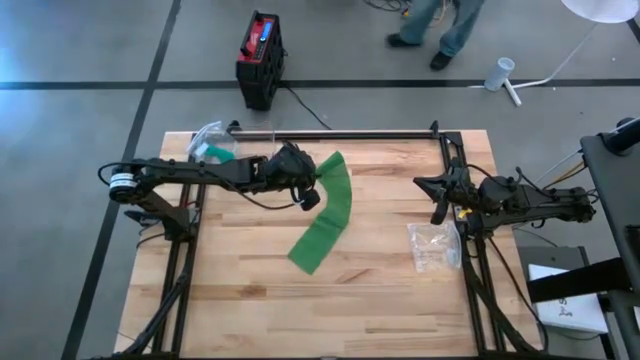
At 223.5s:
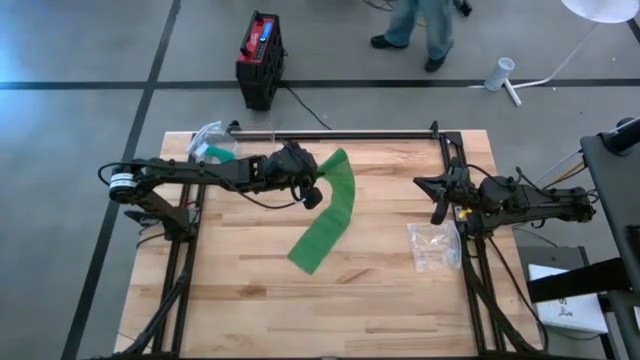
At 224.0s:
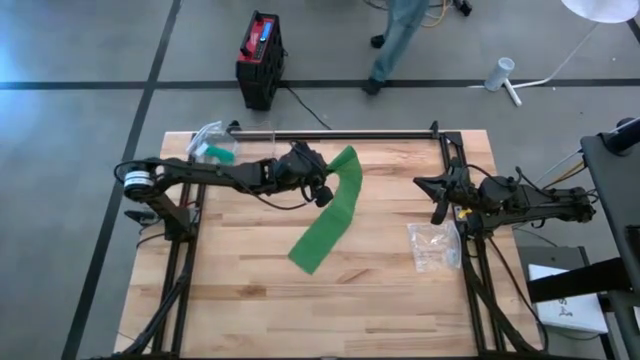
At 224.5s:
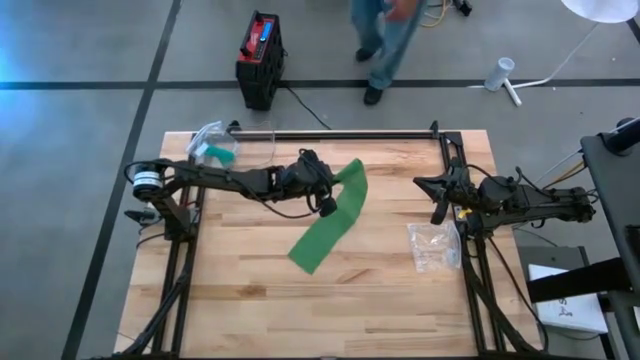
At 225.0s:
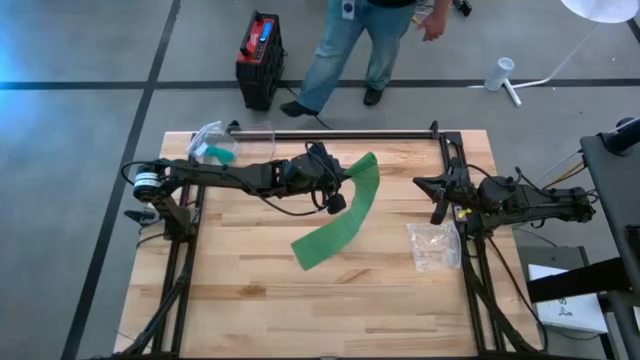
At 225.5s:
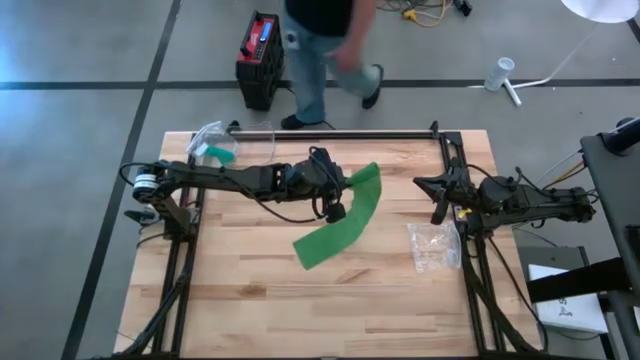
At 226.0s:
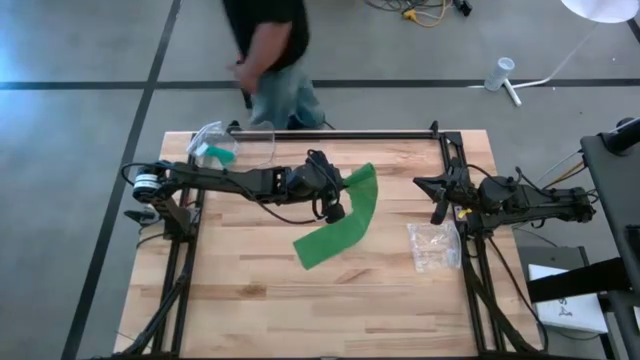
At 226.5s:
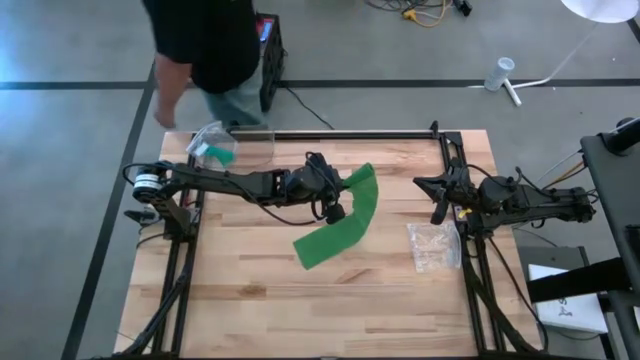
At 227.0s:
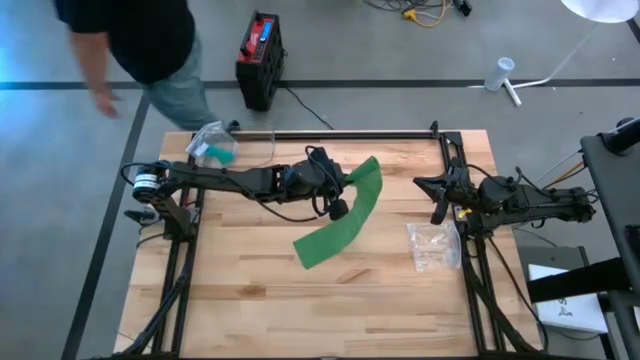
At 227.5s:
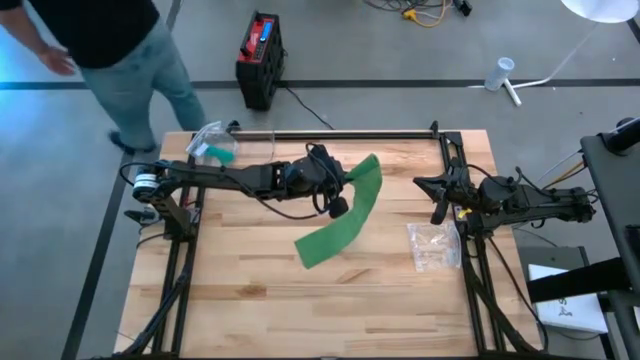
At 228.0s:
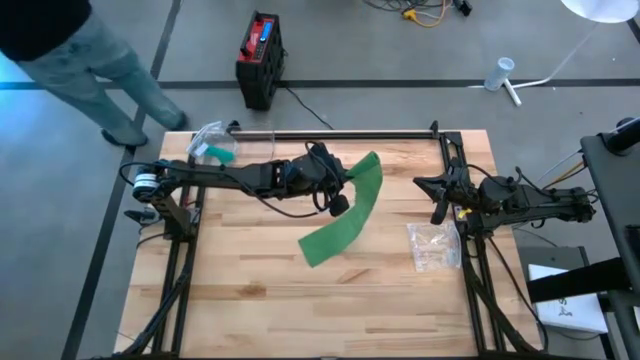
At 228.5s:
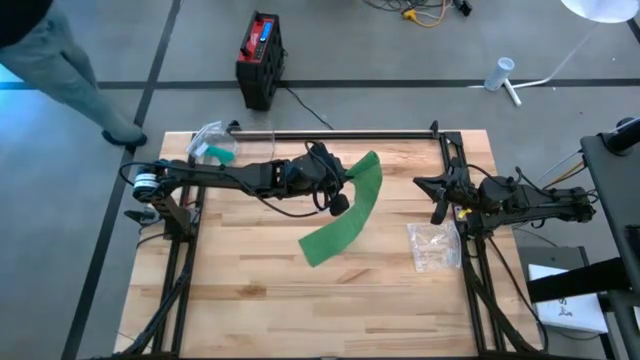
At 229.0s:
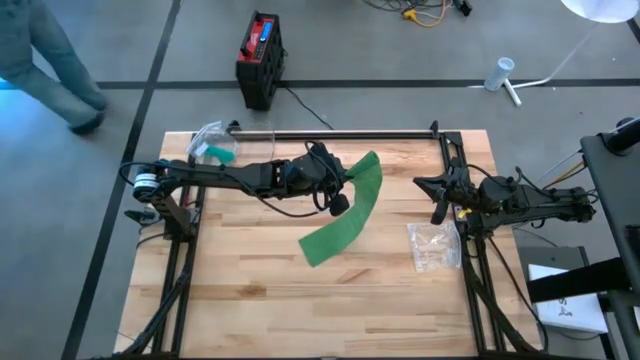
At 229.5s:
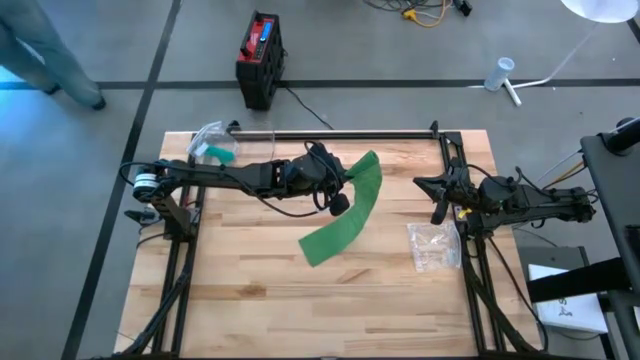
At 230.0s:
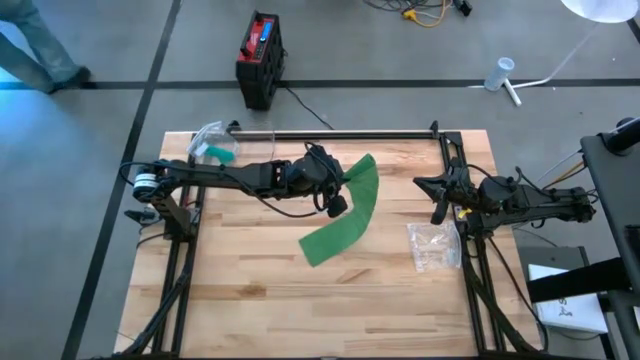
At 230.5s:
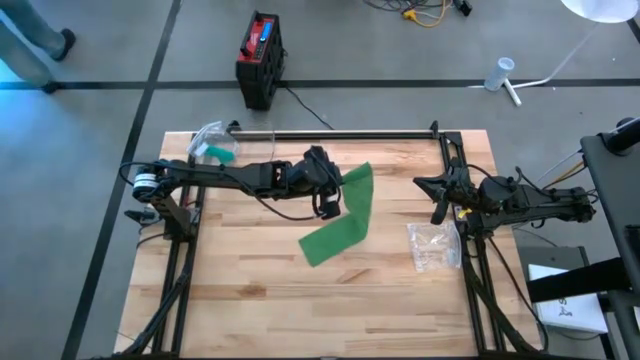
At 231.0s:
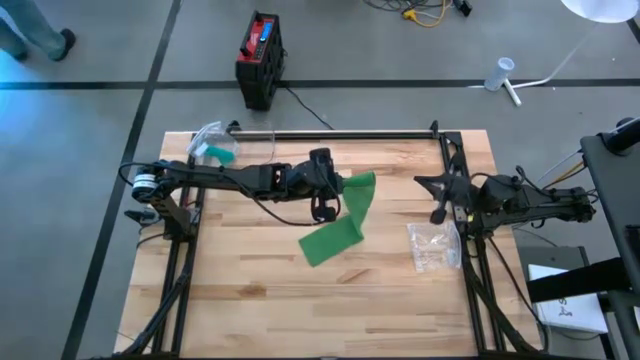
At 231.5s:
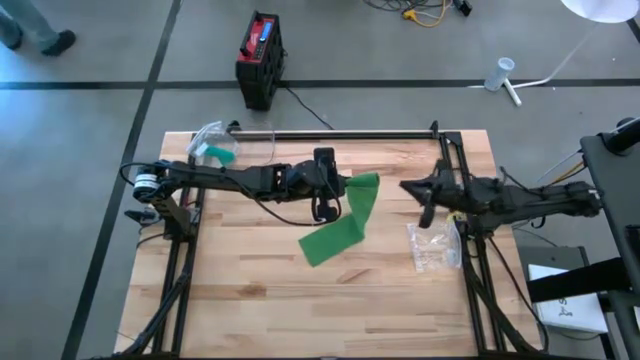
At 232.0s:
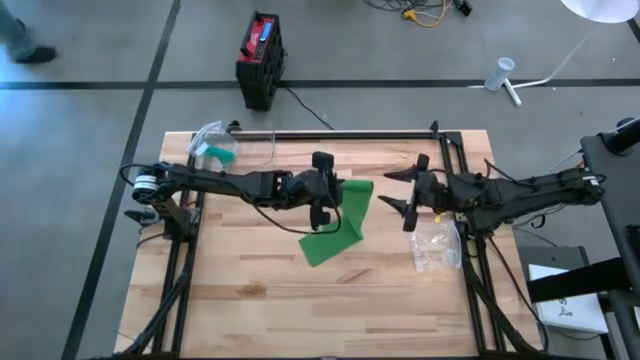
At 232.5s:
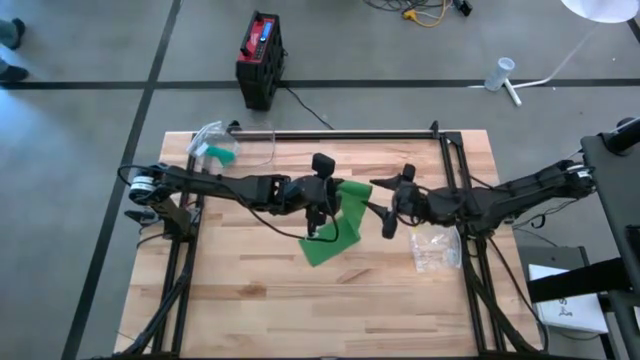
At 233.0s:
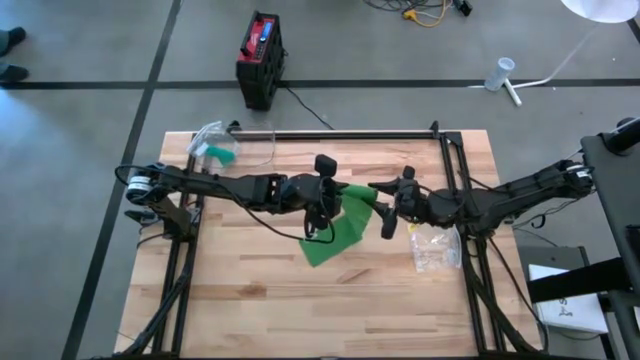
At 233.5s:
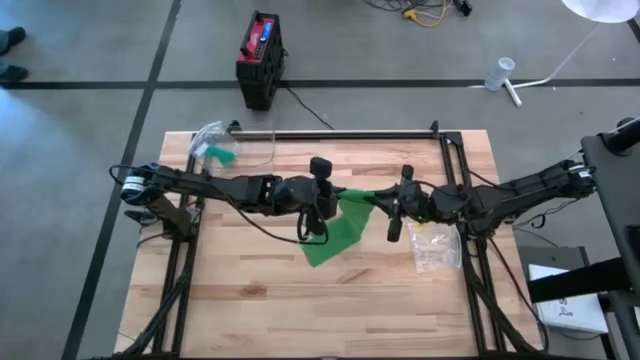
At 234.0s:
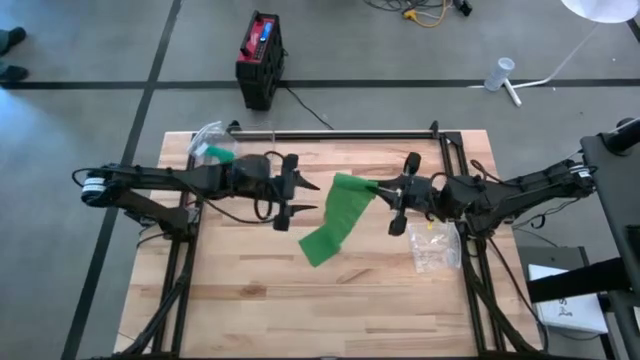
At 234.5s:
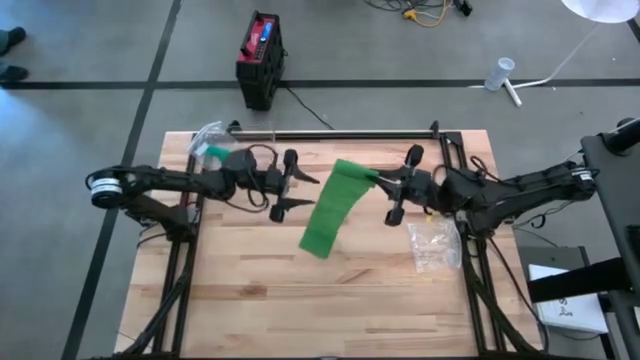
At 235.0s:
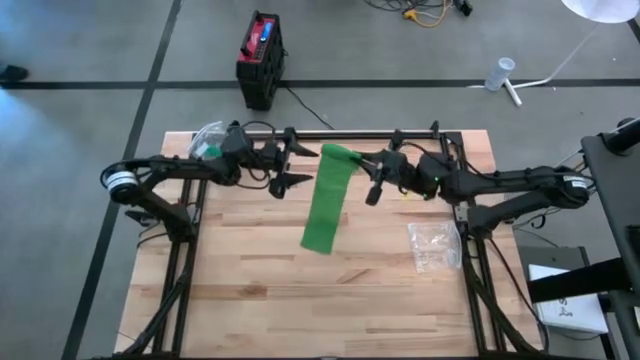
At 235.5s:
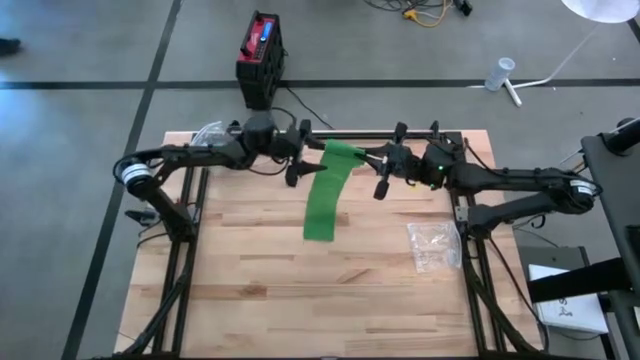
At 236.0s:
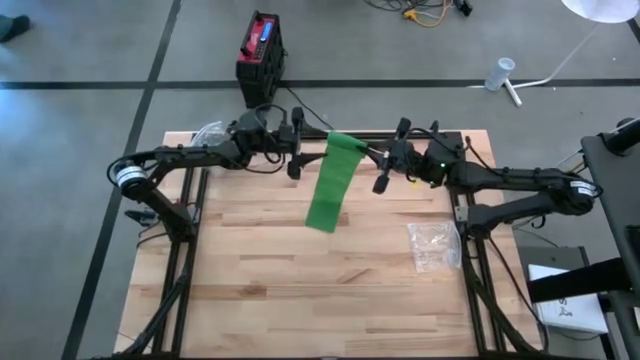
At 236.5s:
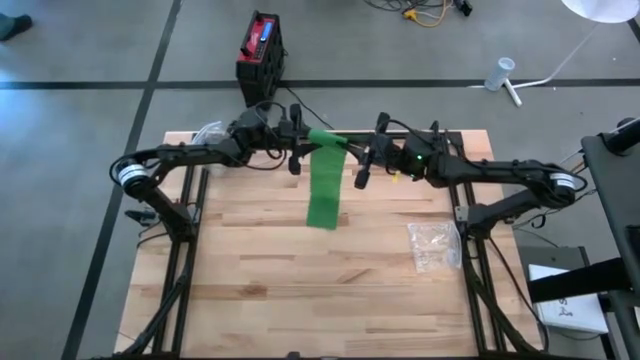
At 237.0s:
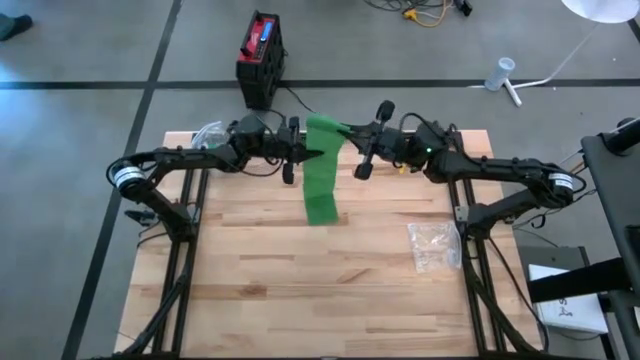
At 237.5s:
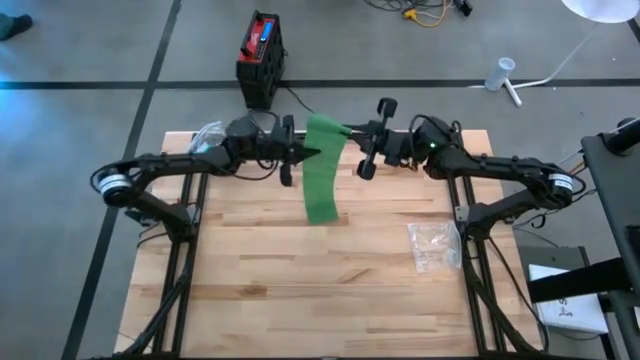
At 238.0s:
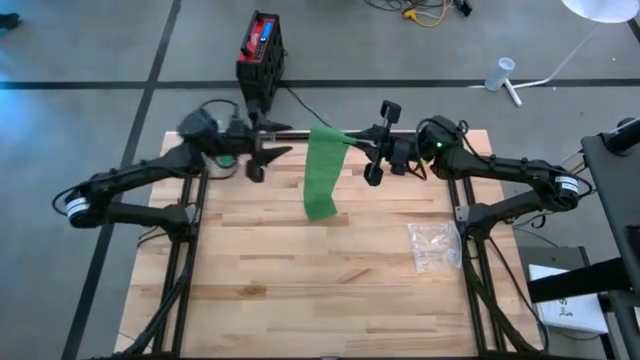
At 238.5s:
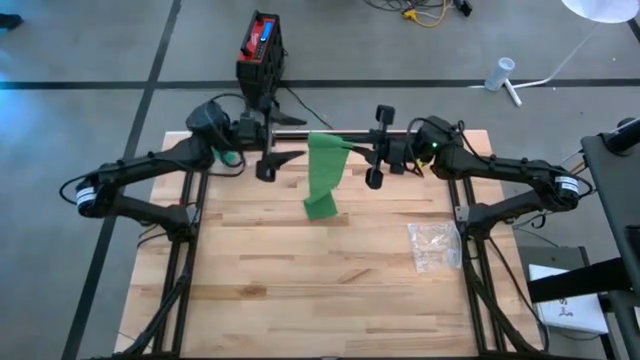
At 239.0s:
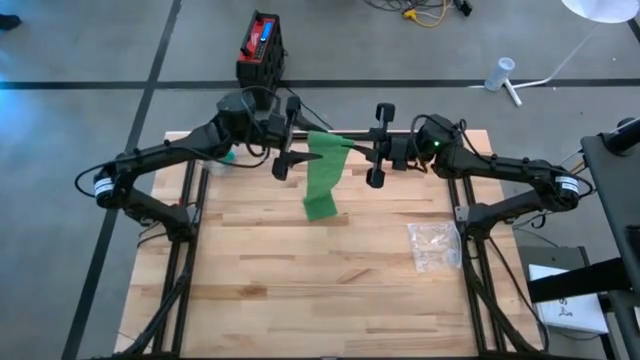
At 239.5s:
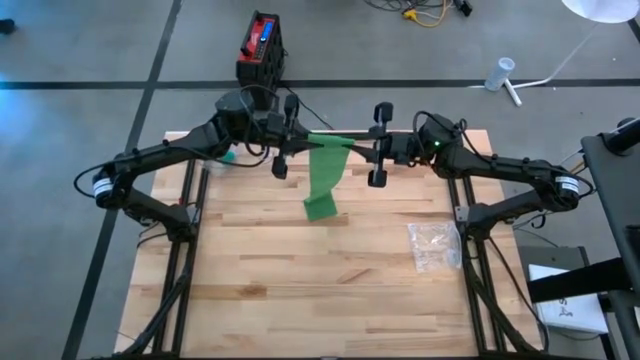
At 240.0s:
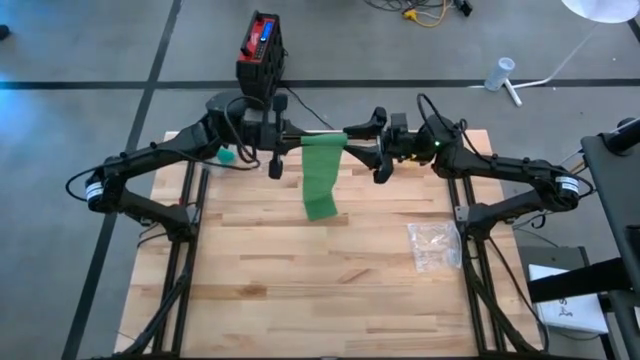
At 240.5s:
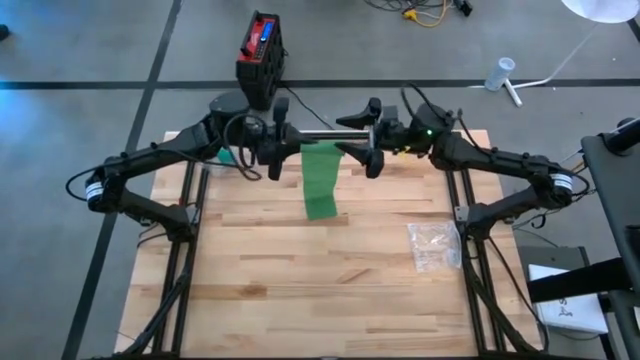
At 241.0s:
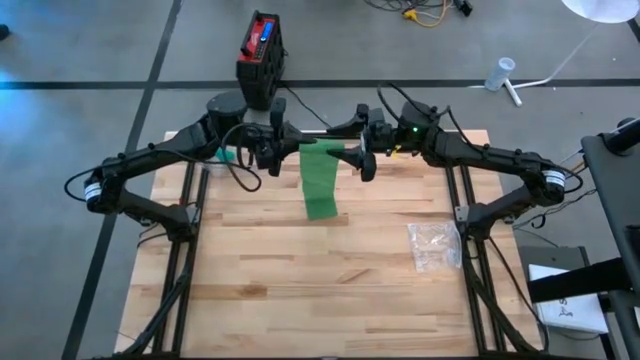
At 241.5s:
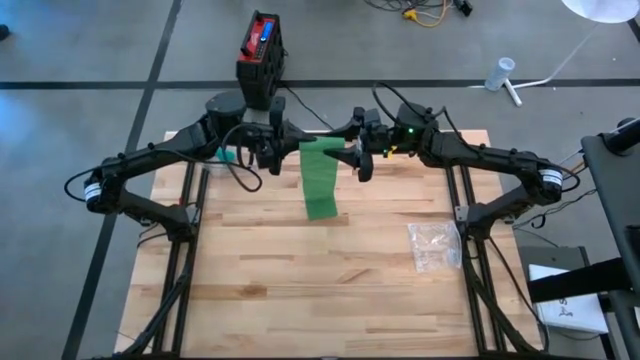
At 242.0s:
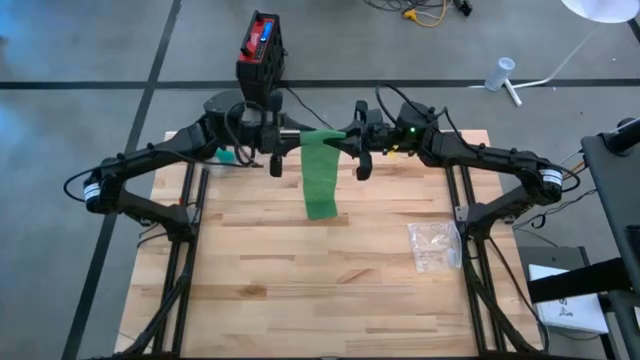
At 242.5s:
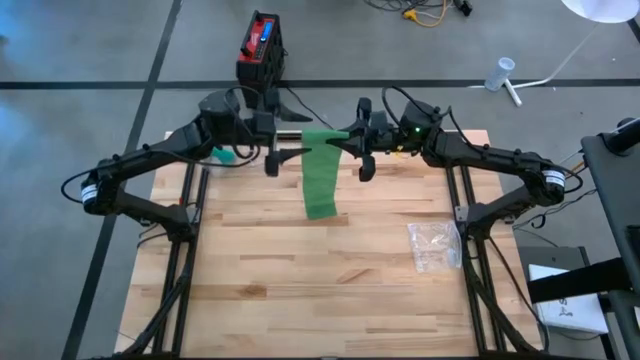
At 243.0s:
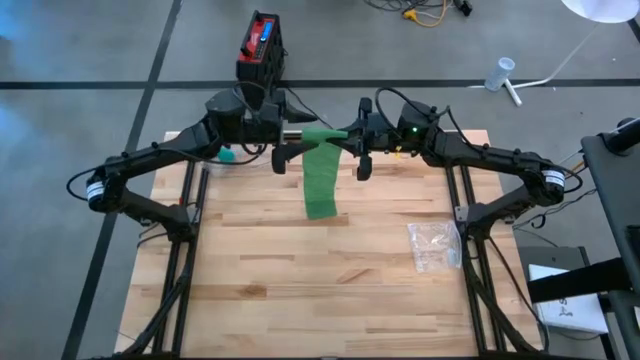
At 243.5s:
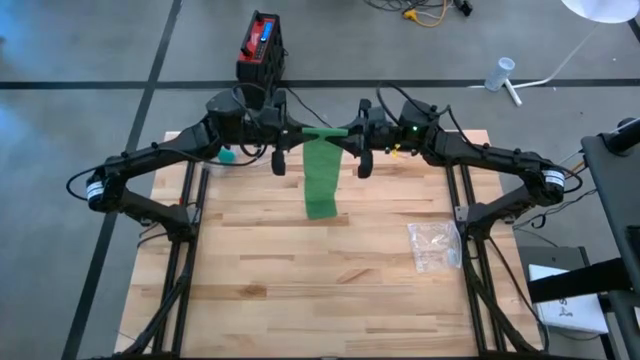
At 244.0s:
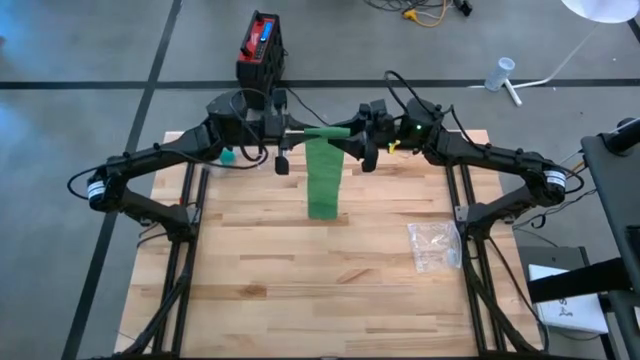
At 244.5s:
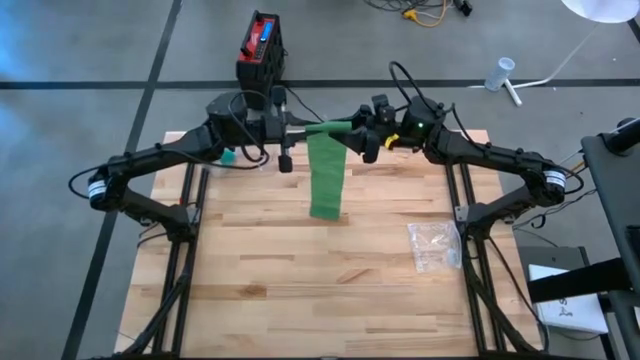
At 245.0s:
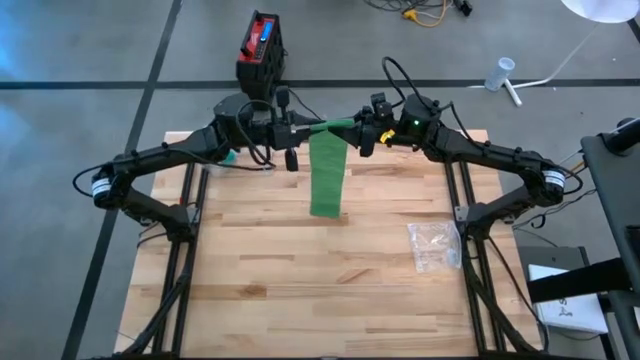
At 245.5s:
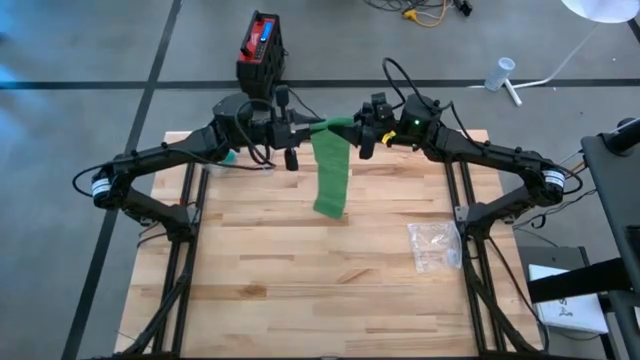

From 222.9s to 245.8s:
Task: Roll bandage
Roll the green bandage
